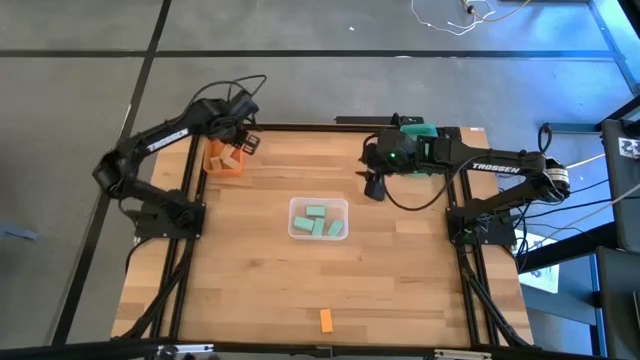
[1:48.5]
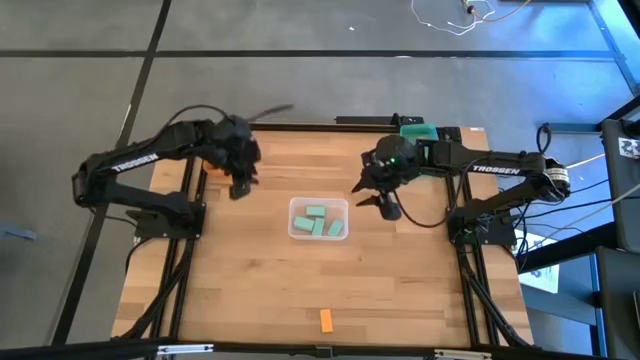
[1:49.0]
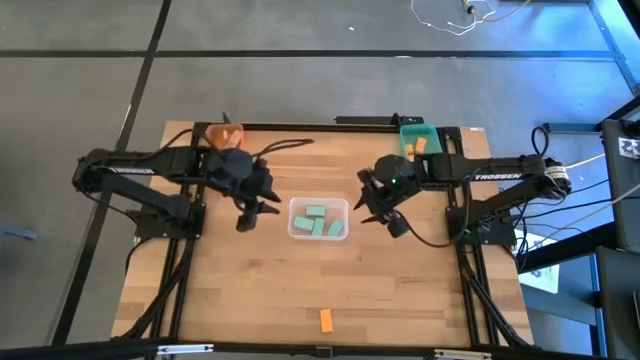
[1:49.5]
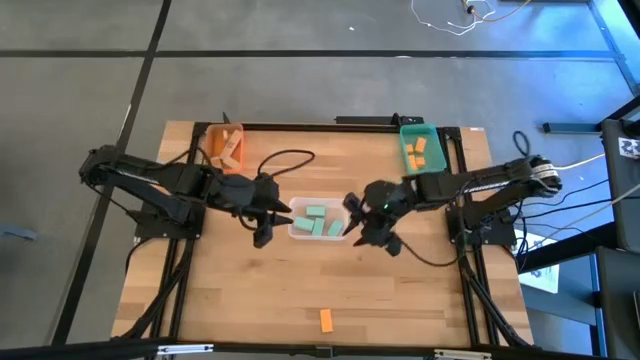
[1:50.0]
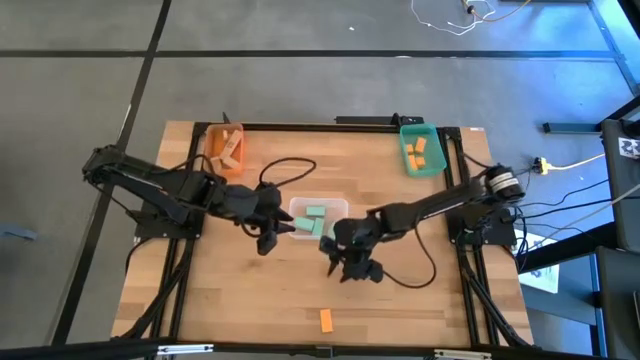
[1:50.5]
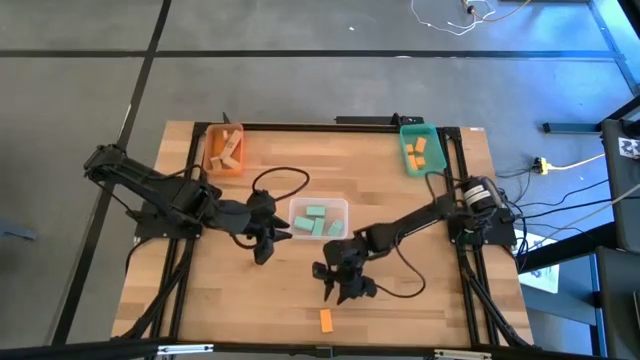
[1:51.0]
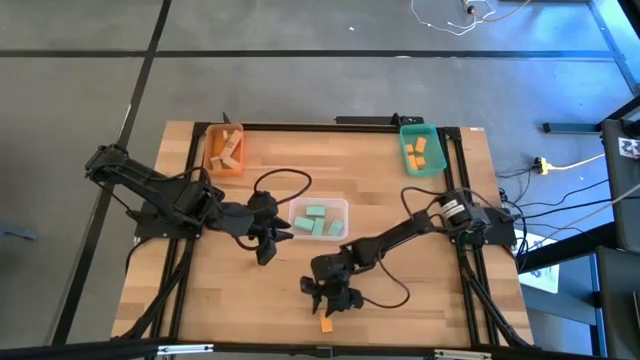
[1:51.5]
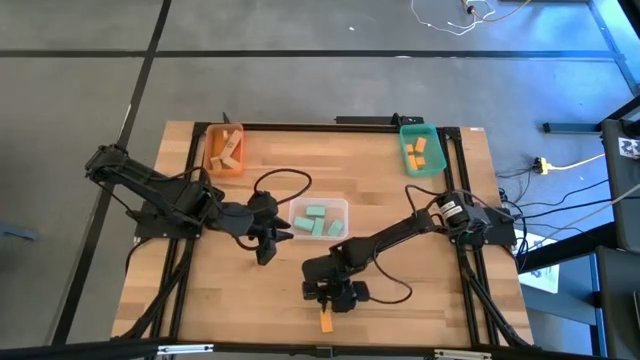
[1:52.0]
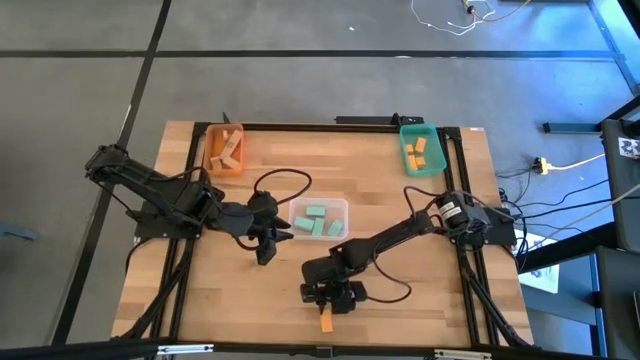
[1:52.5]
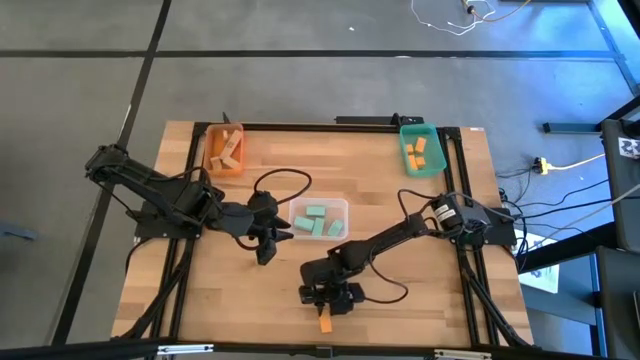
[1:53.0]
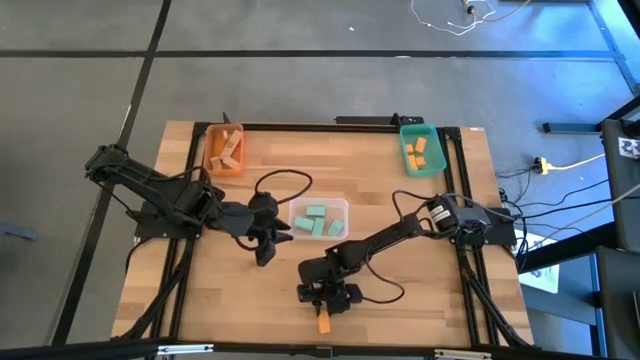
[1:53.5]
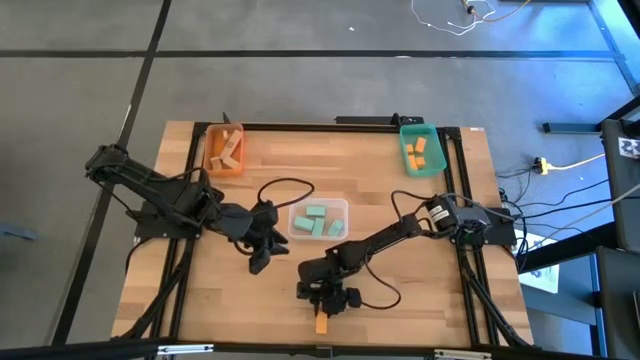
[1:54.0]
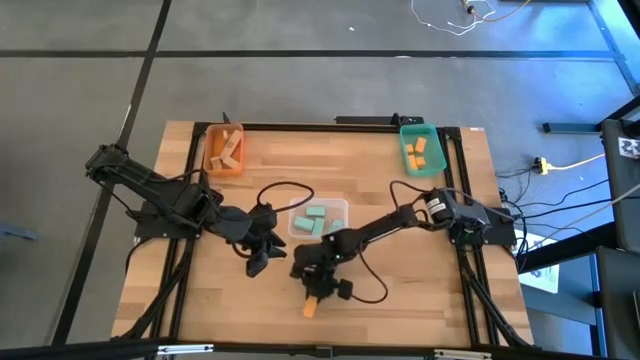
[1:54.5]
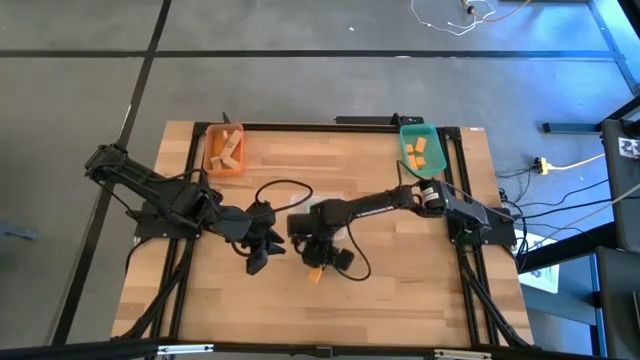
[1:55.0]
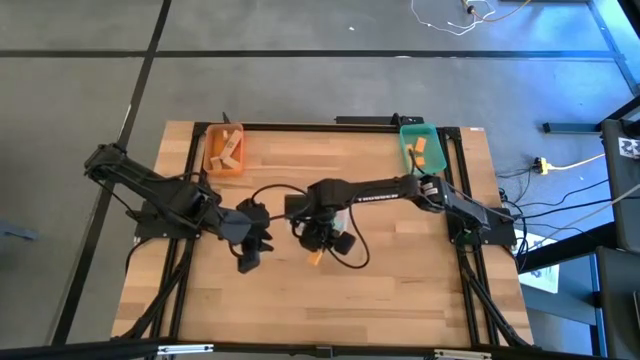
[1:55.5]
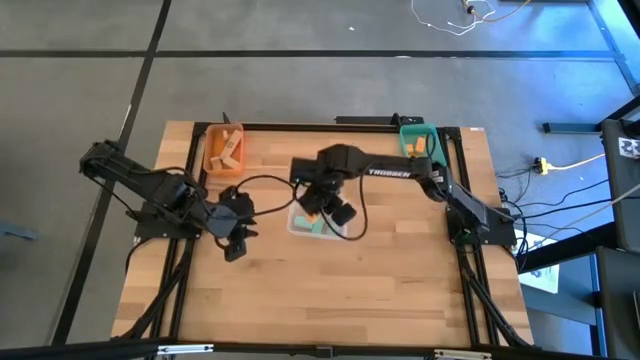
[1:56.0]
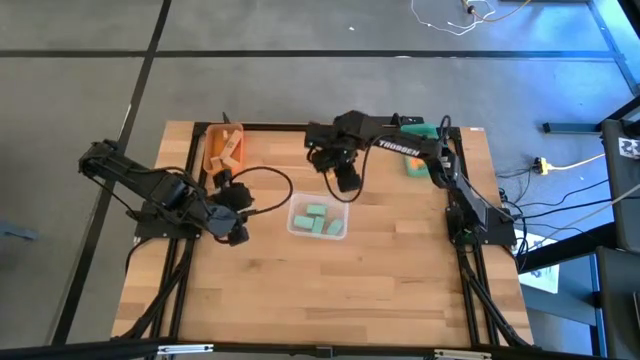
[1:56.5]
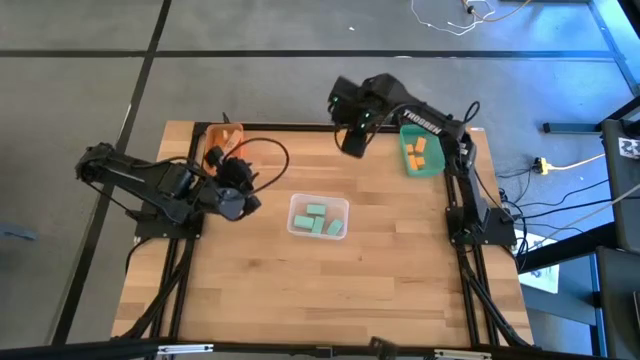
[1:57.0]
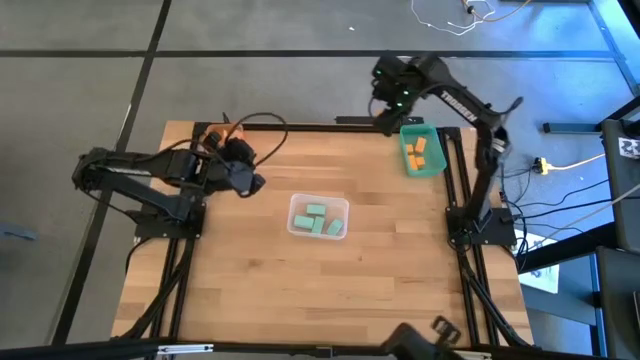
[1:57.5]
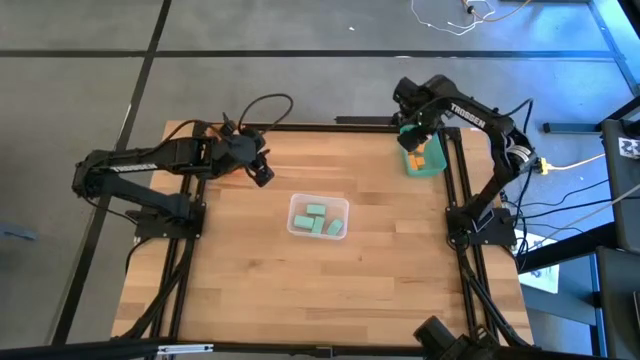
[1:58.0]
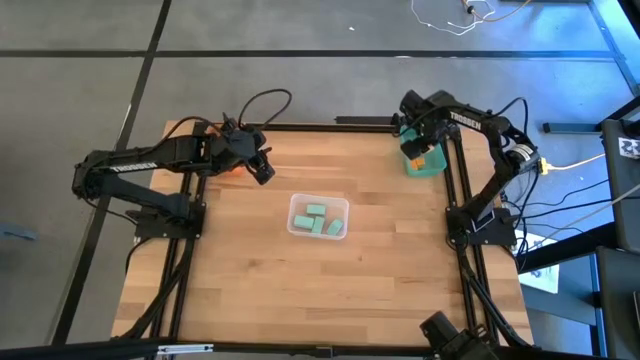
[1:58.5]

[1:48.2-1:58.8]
Task: Sort & place blocks by color
Put the yellow block into the blue bin

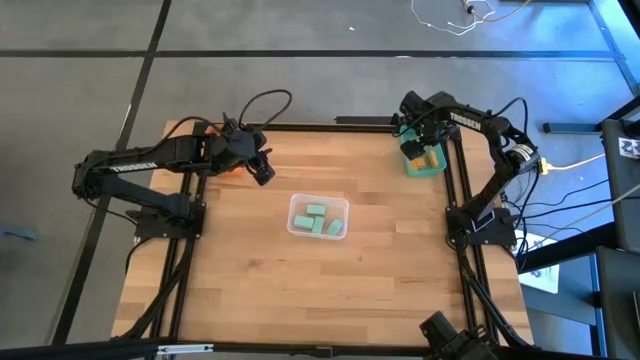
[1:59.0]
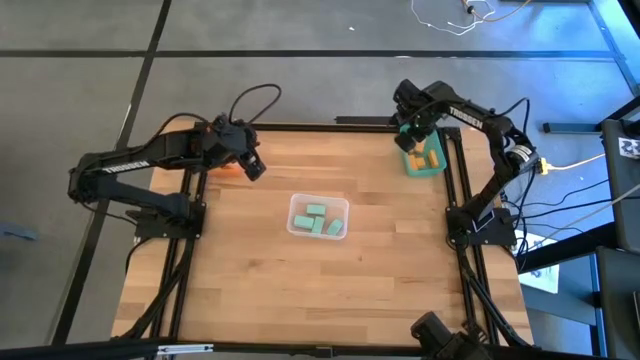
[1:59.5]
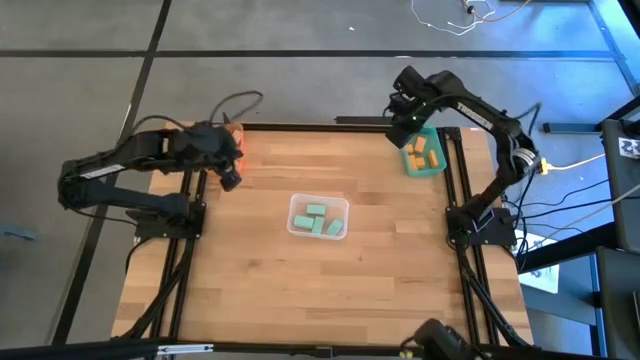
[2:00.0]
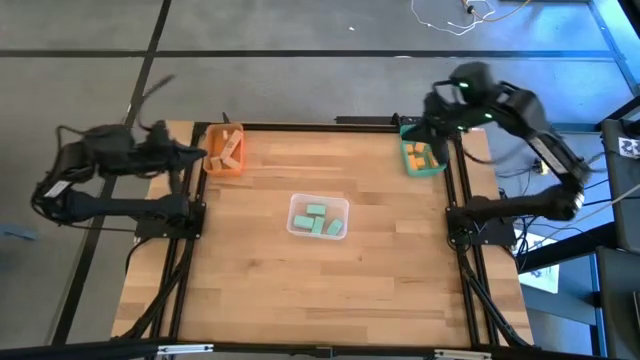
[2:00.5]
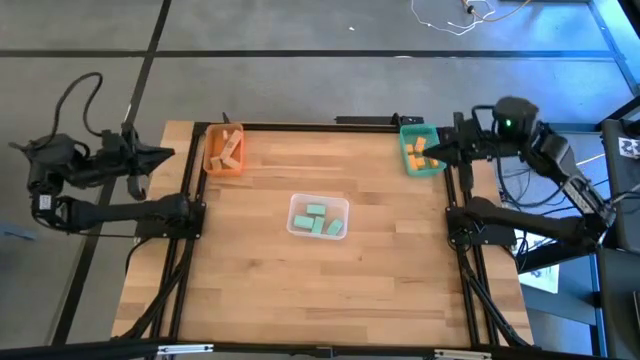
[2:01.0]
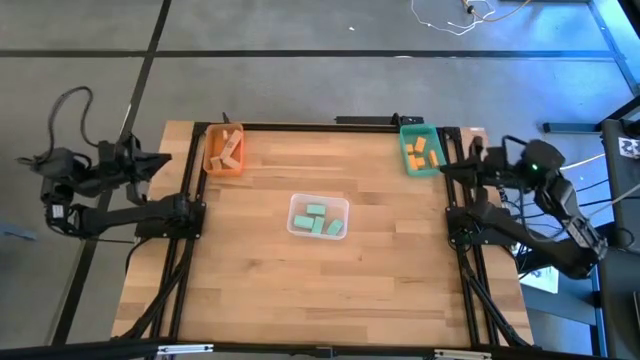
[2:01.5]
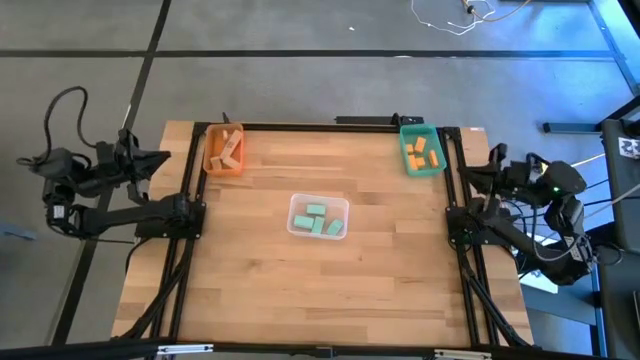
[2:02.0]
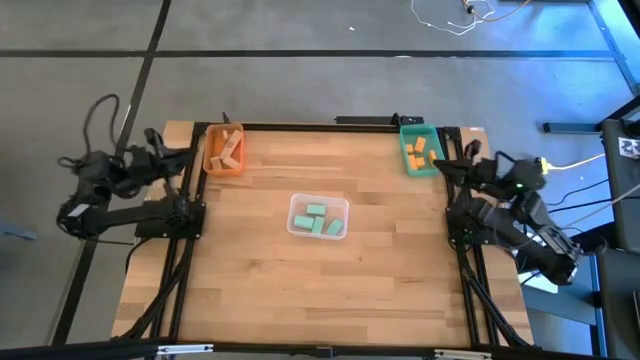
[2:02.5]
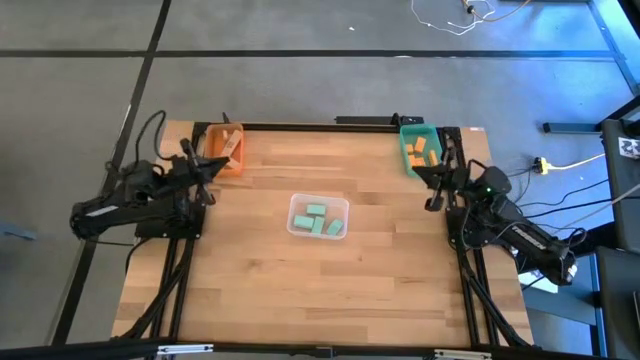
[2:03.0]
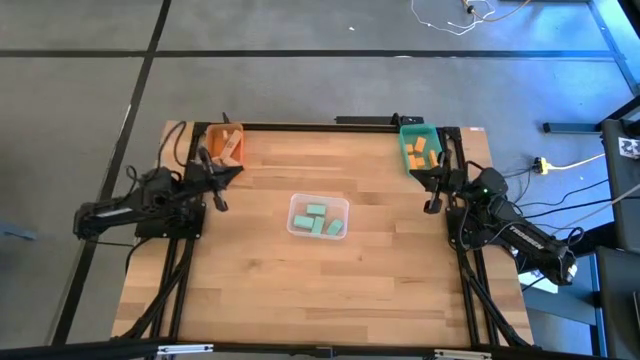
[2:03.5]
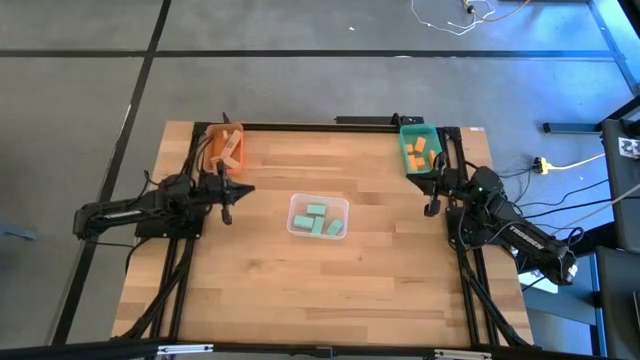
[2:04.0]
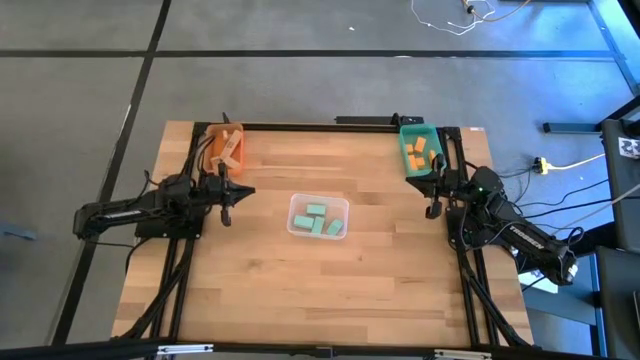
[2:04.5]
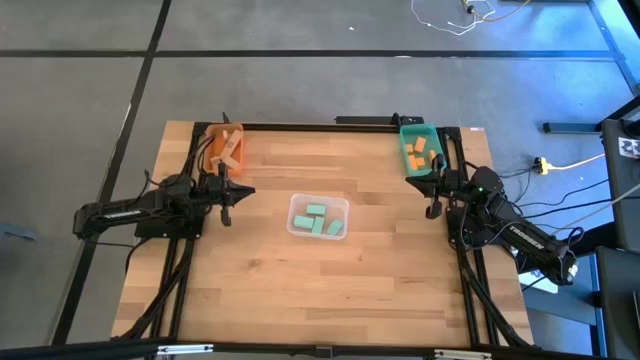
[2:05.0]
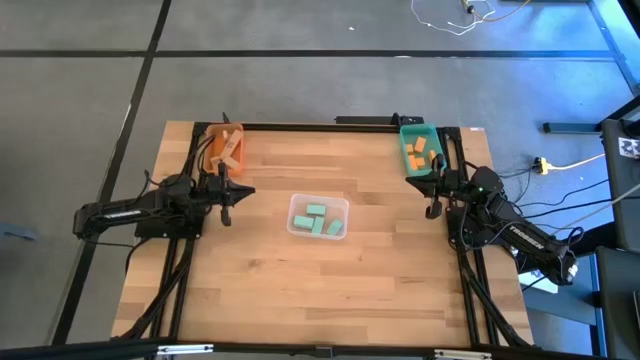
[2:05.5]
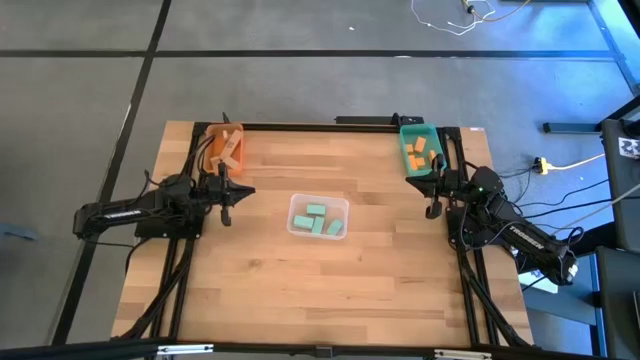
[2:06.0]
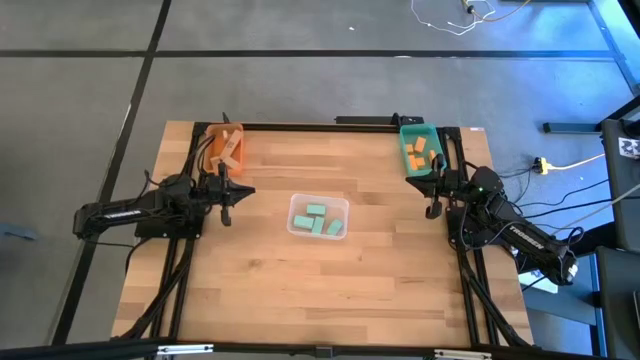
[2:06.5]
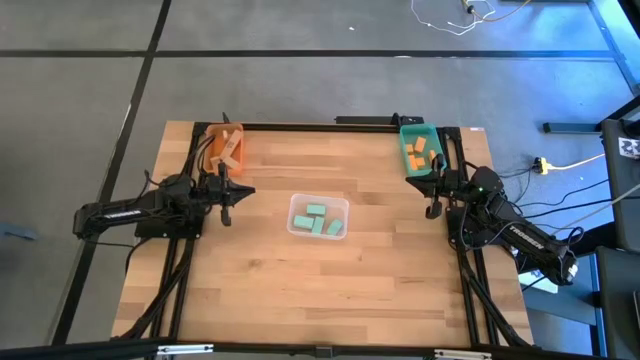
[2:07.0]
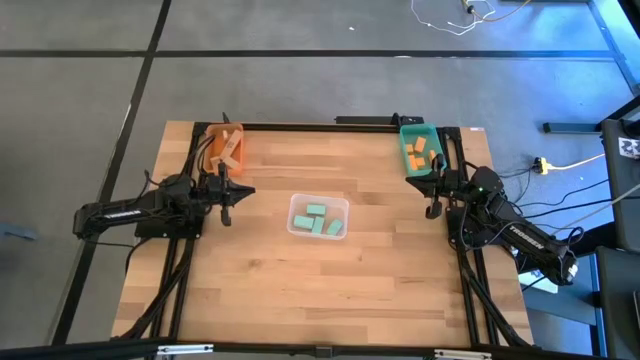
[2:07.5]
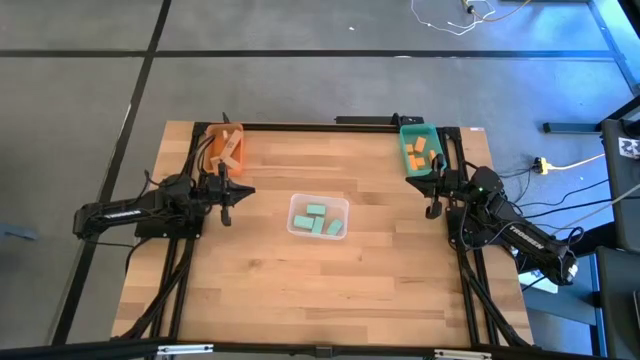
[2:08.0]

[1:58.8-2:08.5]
Return to Home Position
